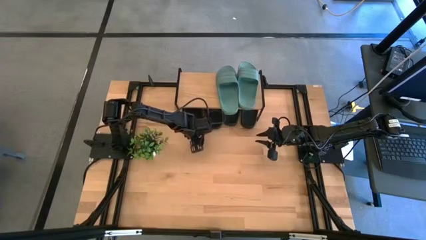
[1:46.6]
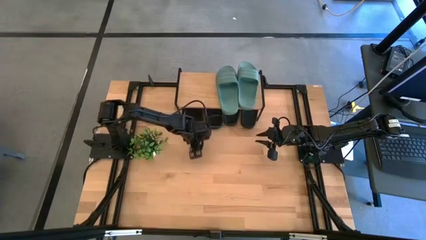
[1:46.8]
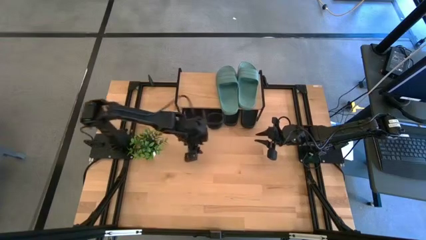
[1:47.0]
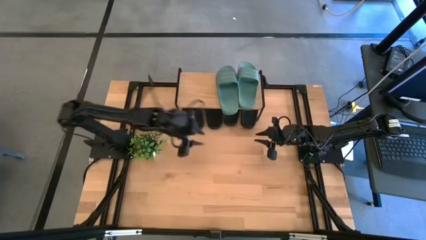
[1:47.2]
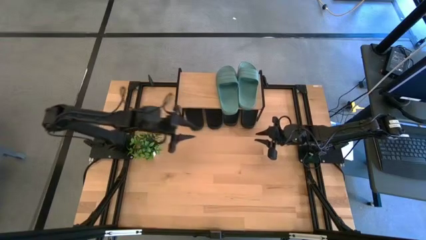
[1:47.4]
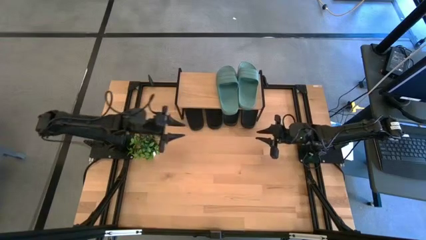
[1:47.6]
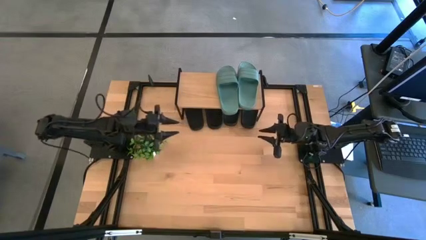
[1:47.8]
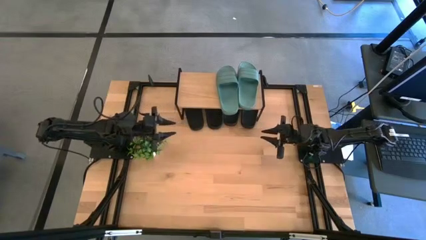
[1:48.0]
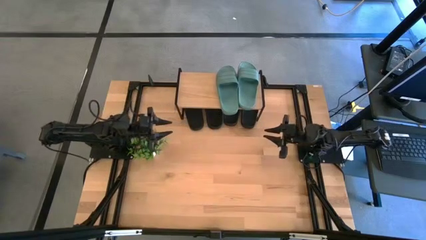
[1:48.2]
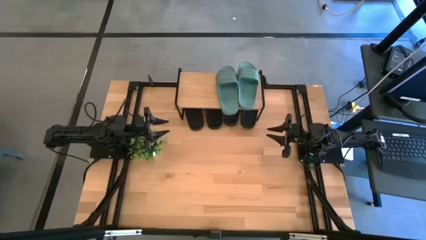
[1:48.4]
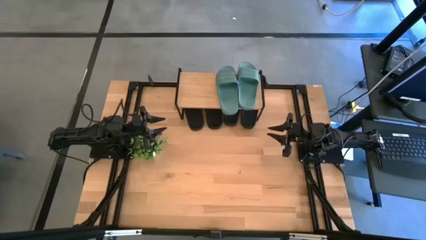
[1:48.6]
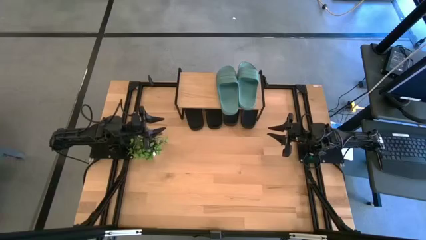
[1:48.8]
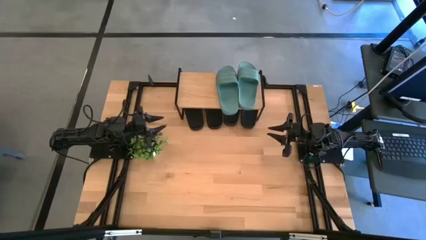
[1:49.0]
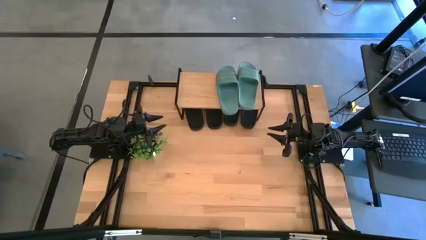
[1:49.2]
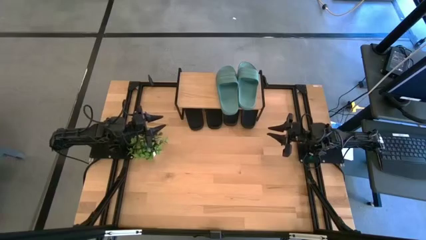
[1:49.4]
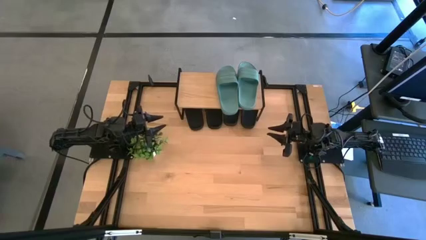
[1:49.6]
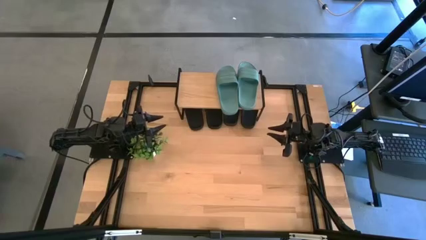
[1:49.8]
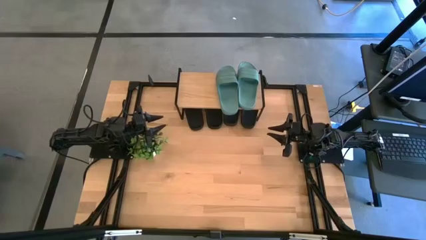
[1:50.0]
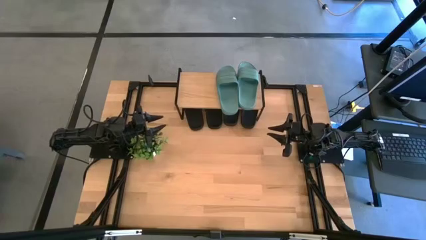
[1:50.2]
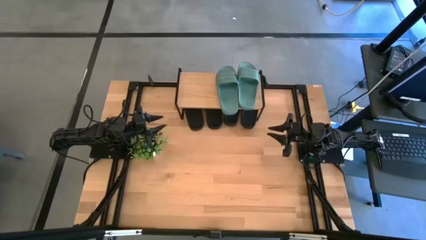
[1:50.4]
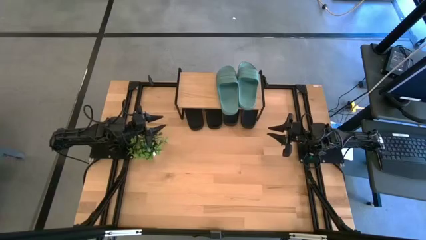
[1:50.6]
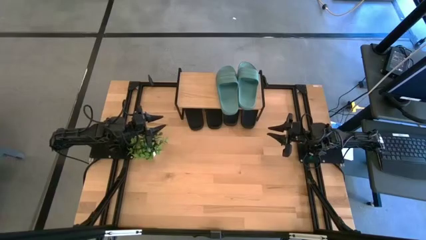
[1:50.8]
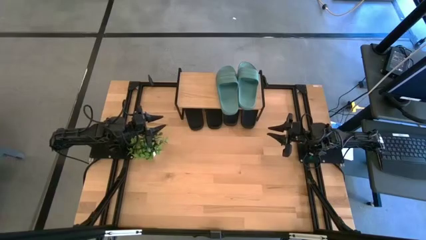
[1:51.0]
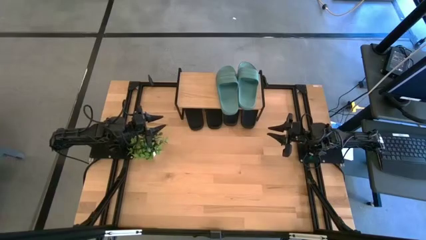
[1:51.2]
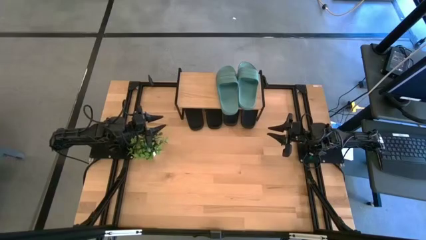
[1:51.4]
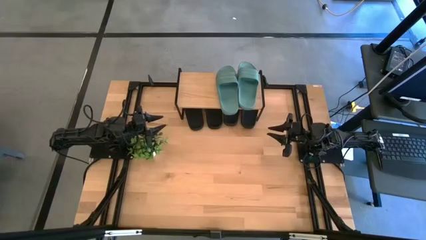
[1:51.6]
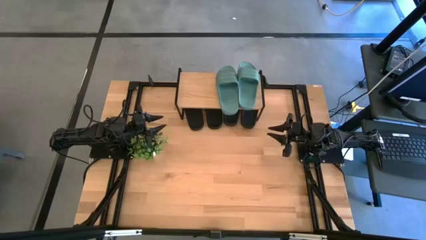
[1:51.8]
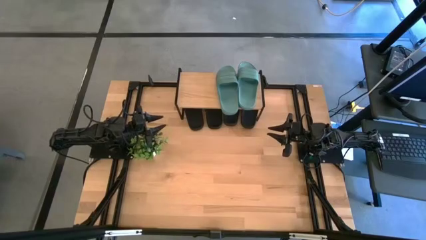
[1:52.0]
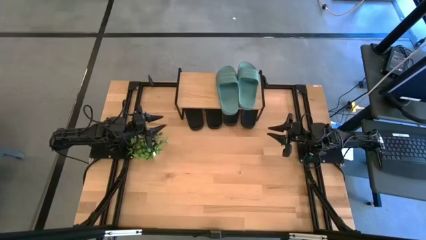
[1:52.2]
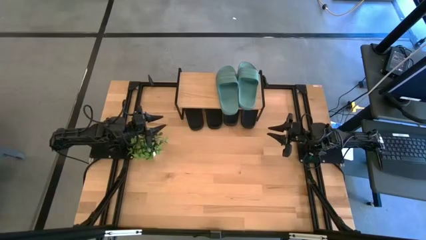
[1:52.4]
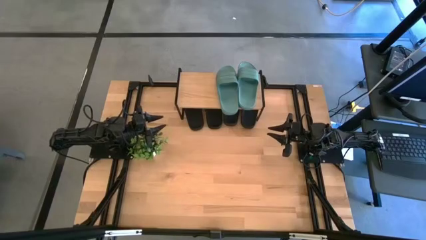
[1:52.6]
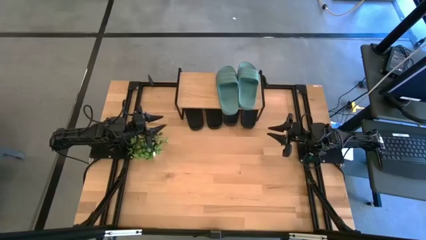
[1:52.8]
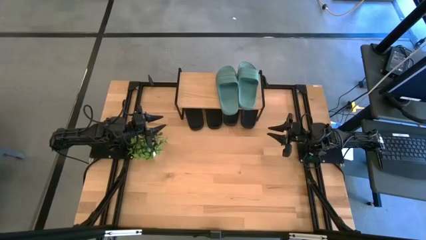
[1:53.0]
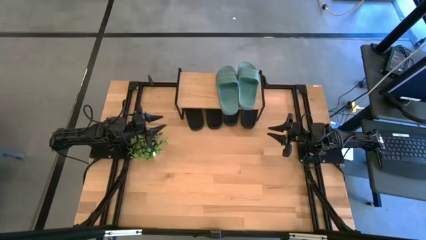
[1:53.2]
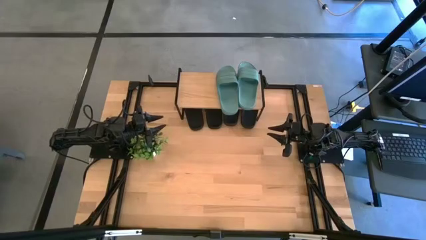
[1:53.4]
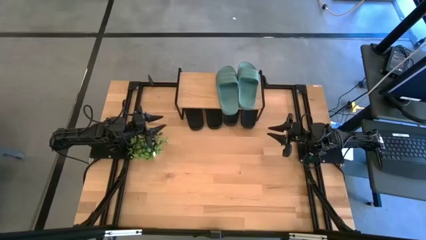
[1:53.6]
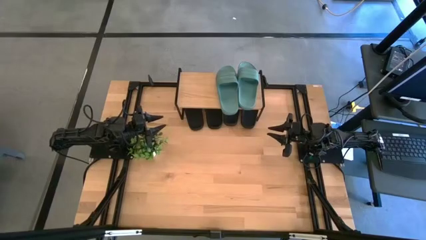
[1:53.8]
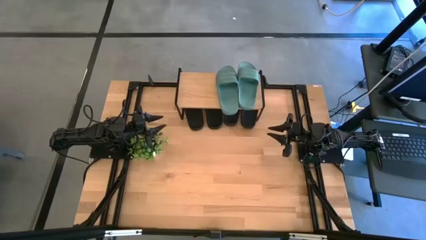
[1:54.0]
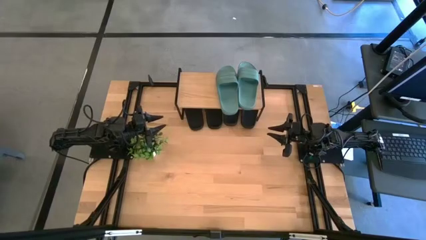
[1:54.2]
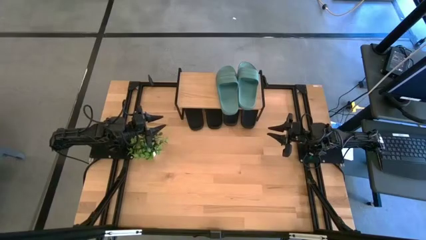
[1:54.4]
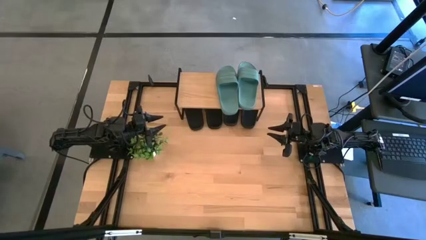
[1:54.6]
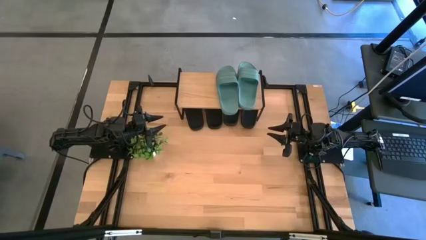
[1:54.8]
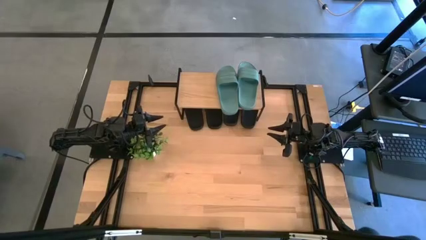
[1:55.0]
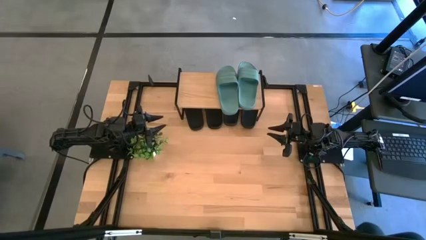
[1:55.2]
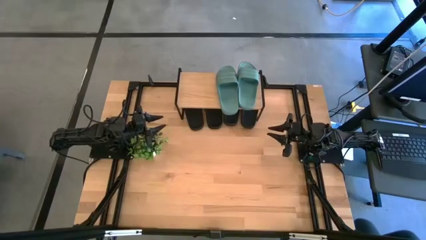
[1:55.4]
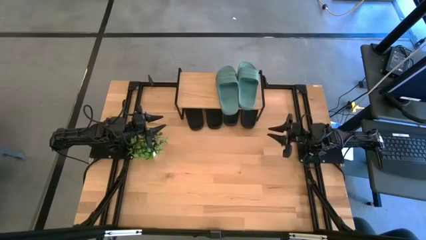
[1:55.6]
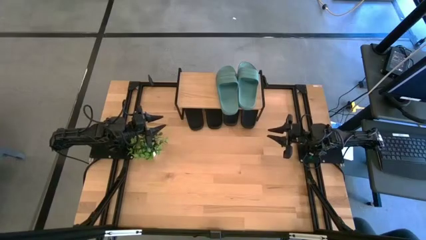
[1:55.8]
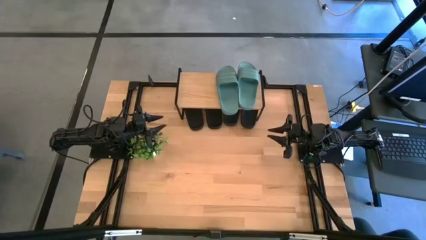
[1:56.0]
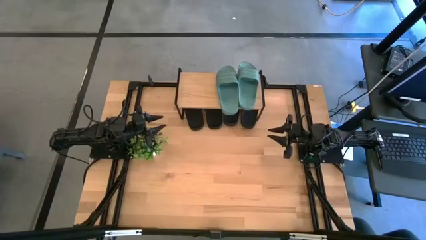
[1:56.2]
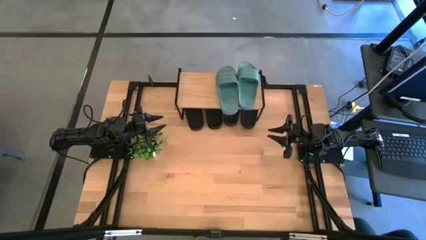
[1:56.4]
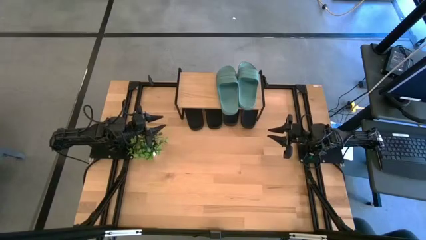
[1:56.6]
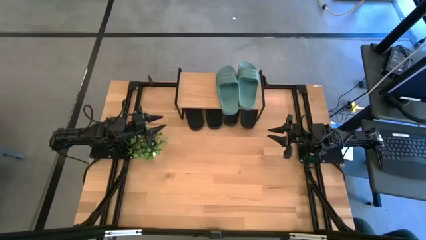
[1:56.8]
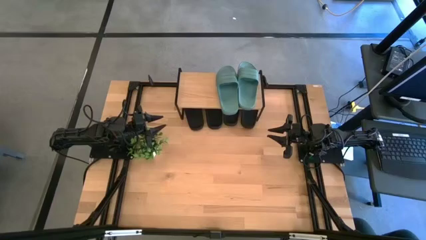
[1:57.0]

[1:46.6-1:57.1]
Task: Pick and place slides into the shelf
Return to Home Position

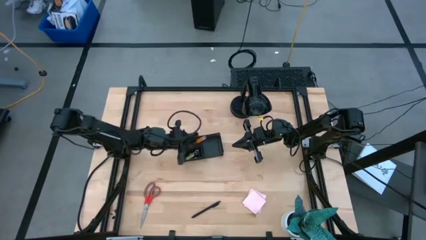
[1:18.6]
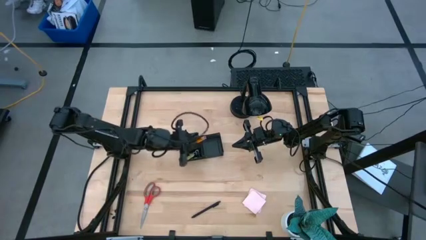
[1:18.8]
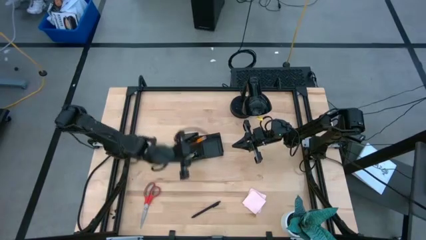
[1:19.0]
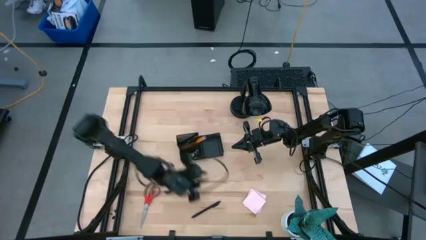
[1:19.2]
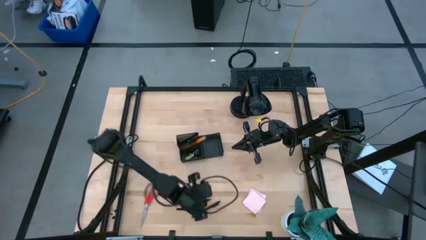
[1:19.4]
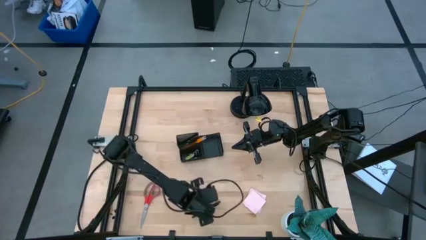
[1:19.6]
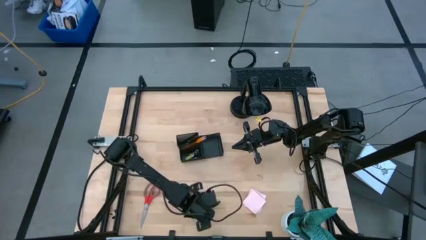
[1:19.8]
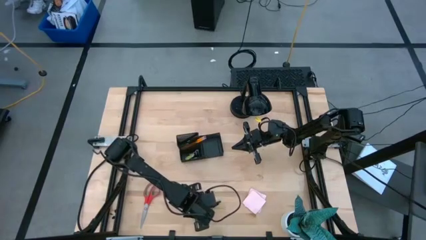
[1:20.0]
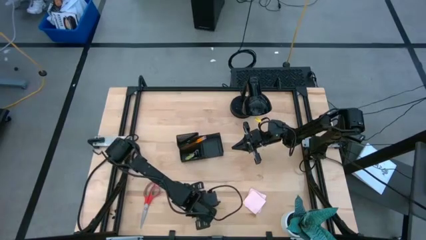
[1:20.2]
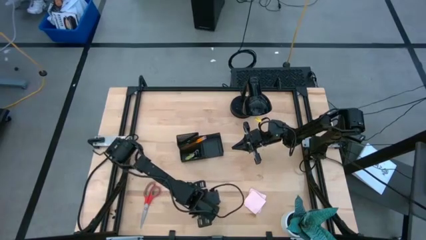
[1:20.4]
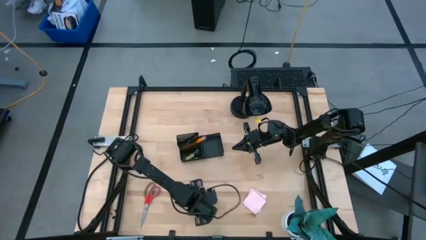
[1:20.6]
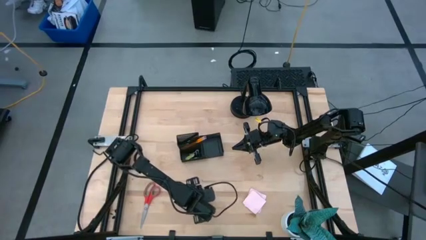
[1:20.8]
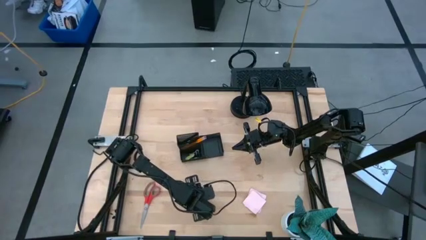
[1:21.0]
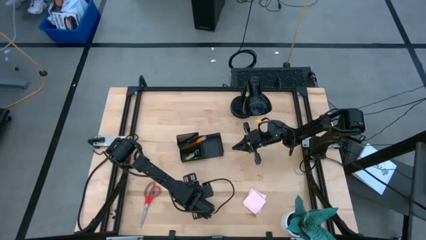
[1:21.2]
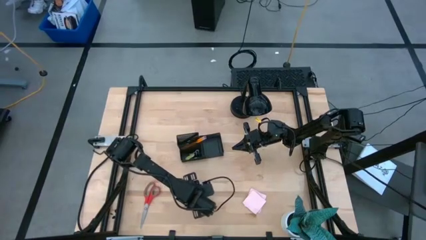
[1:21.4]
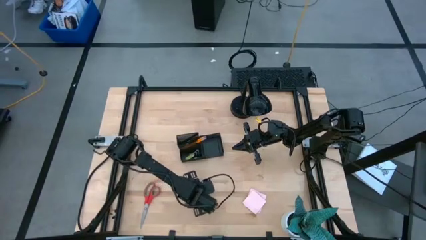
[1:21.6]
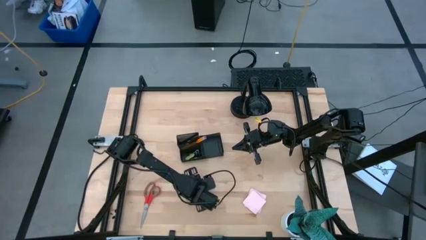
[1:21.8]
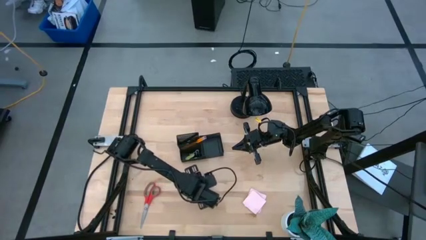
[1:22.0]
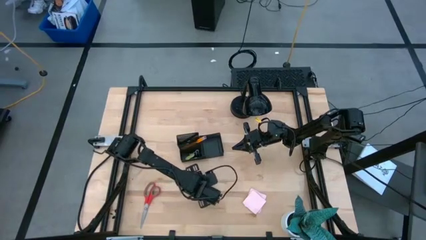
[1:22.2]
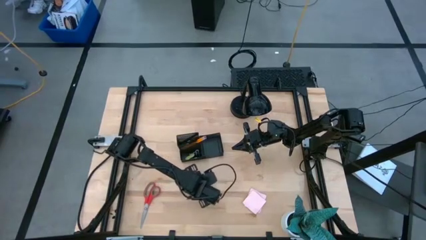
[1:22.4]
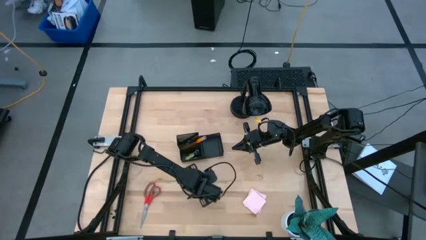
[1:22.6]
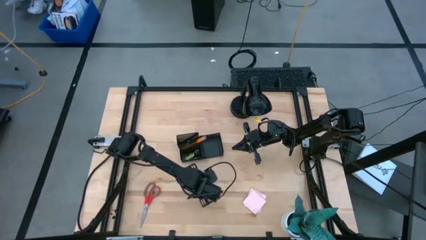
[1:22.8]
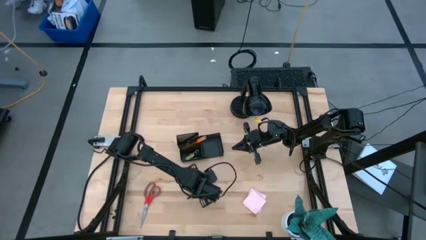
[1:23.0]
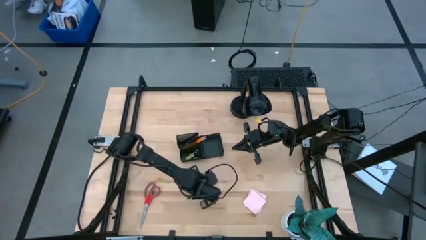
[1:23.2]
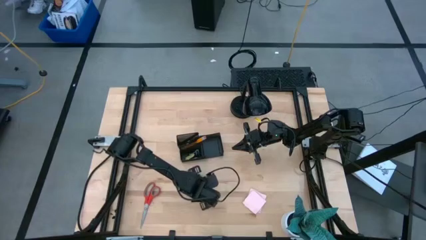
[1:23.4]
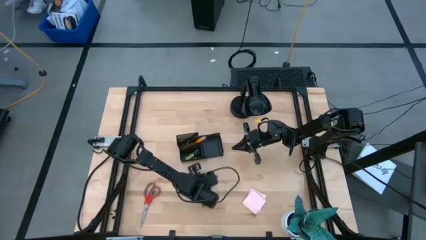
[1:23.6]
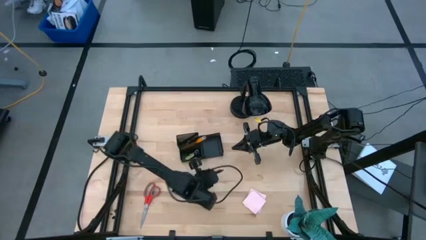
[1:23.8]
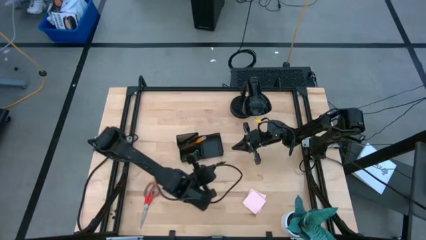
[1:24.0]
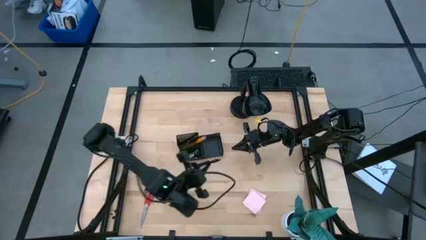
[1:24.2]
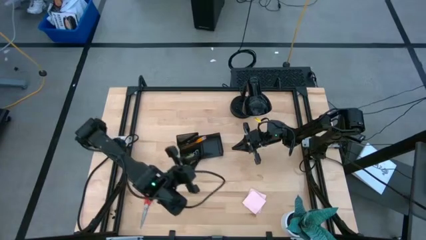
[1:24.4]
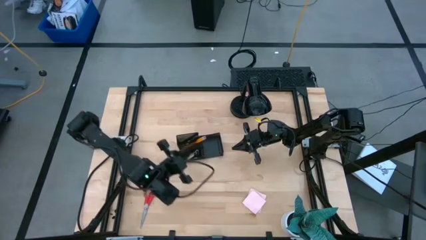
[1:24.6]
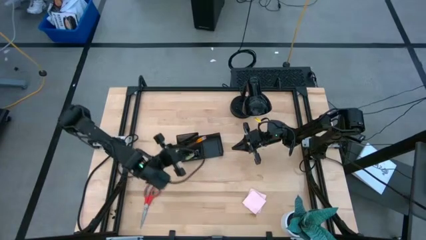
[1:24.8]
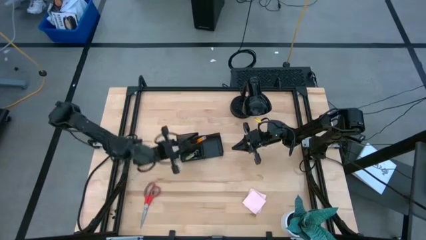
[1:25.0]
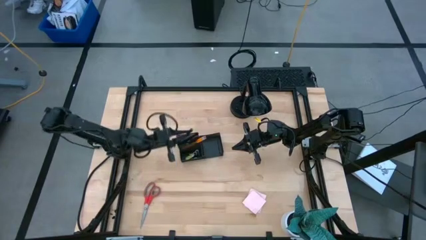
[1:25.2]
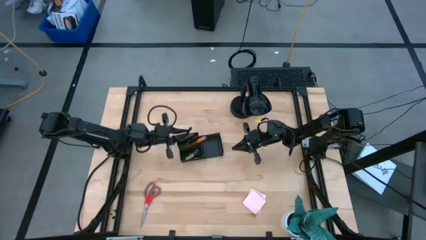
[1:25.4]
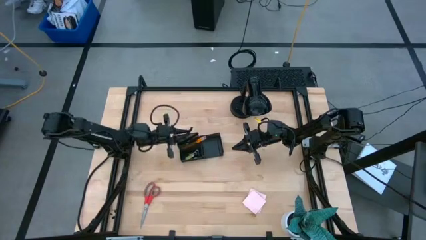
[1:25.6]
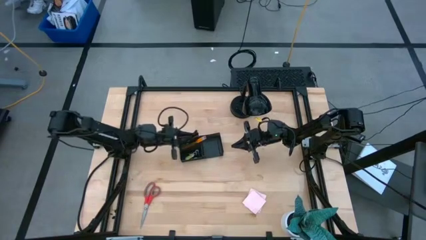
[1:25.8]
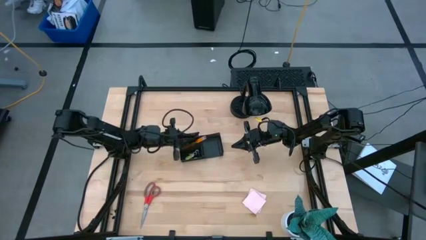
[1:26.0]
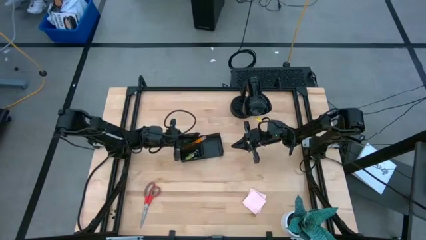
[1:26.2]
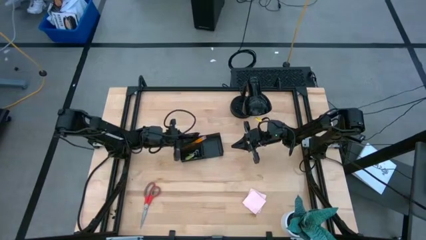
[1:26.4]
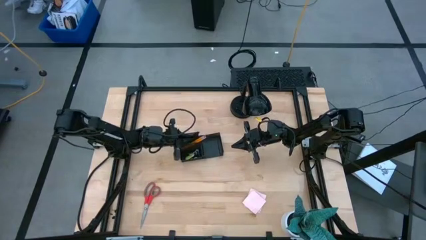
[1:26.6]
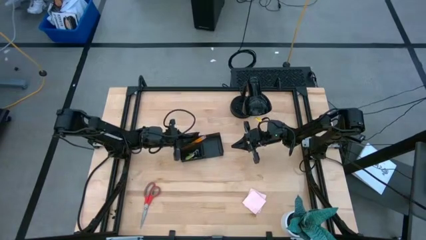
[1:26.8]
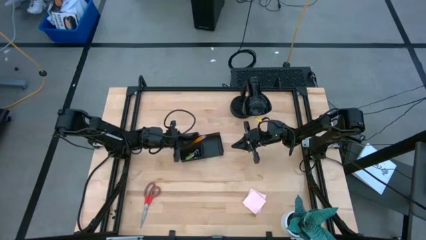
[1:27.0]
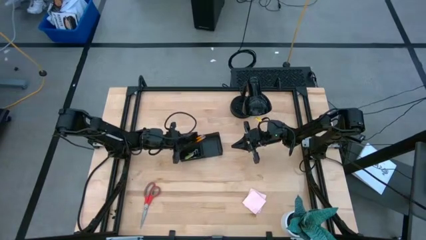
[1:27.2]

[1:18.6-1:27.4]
Task: Pick and place office supplies into organizer
Put the black pen into the black desk organizer
